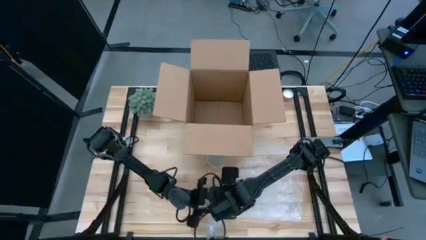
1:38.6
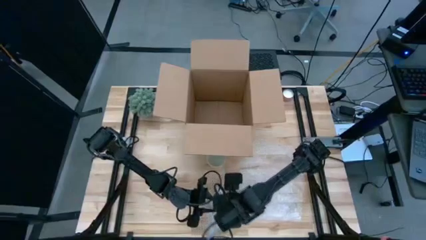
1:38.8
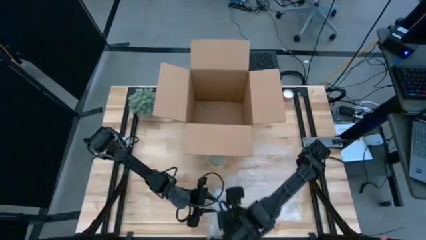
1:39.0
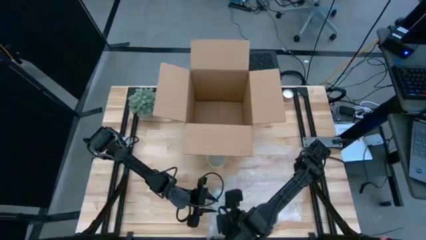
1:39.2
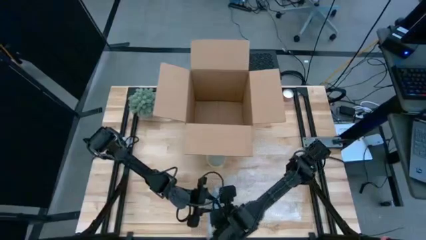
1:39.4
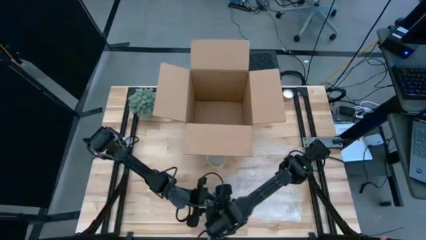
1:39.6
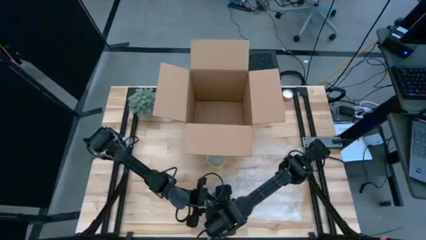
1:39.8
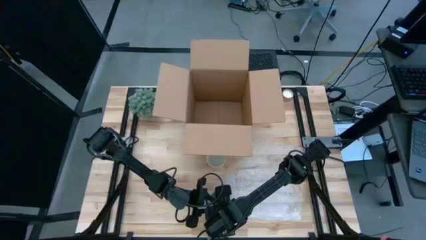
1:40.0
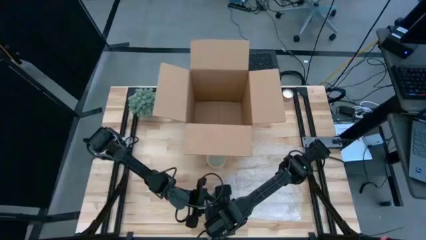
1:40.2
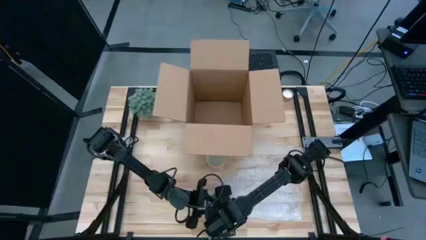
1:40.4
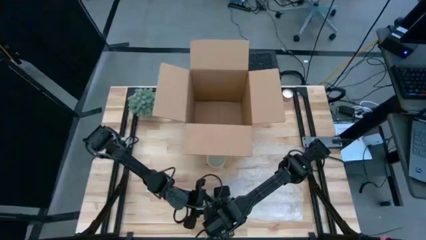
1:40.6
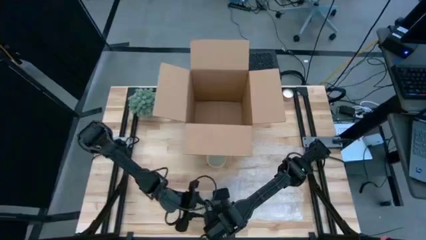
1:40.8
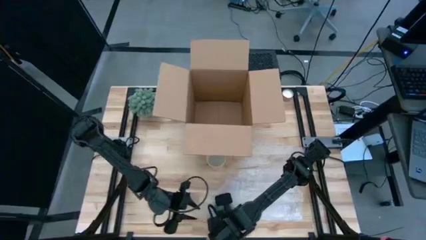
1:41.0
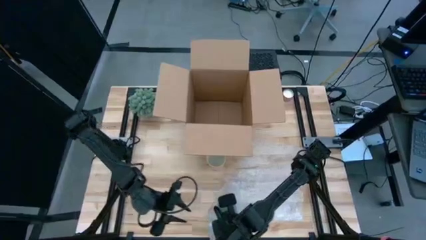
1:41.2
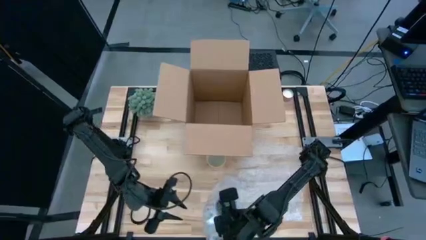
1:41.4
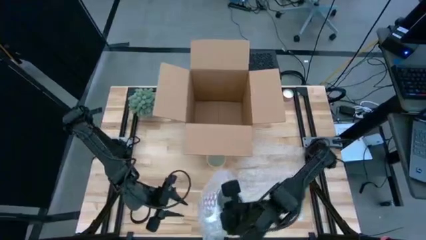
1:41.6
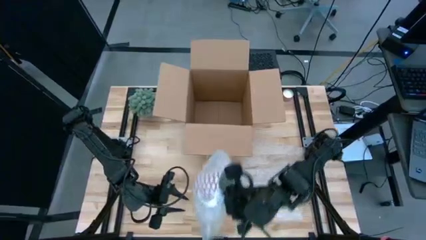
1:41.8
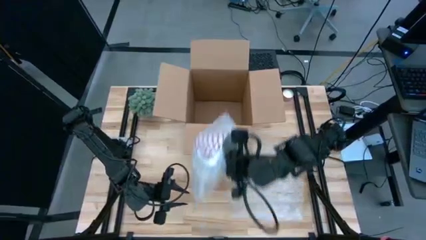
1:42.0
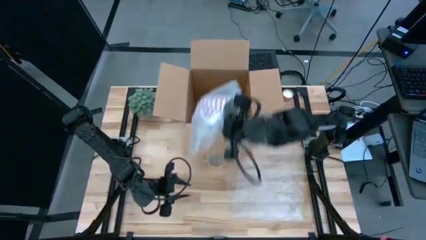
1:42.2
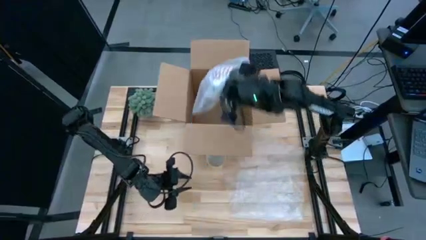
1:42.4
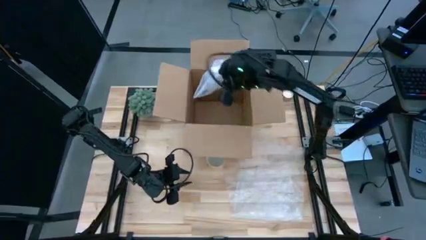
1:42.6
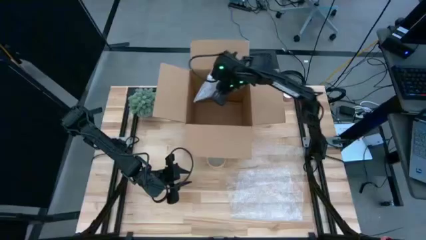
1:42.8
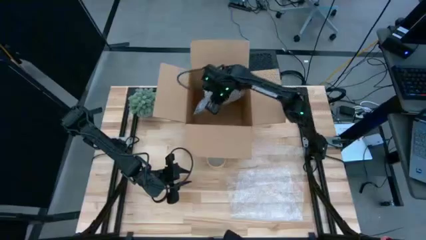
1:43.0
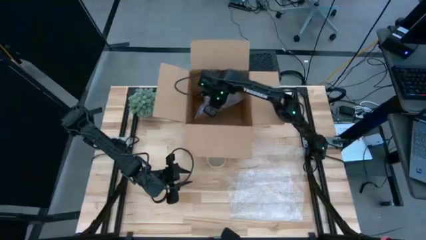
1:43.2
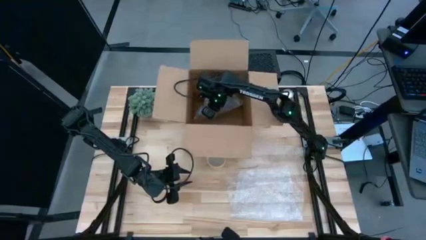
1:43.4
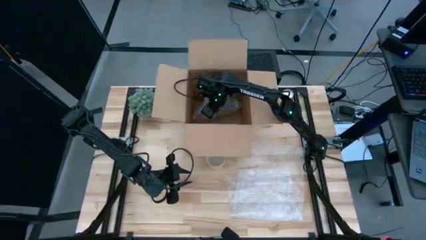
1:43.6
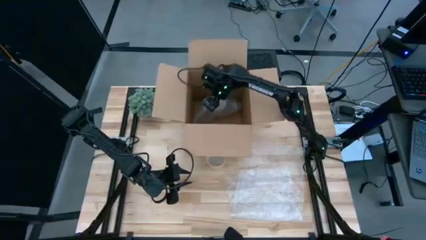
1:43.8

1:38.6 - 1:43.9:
Task: wrap mug
Put the wrapped mug into the box

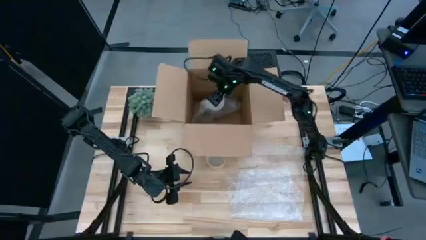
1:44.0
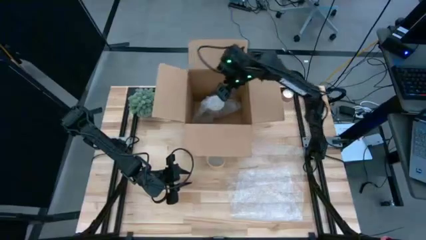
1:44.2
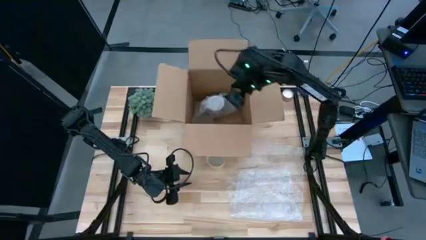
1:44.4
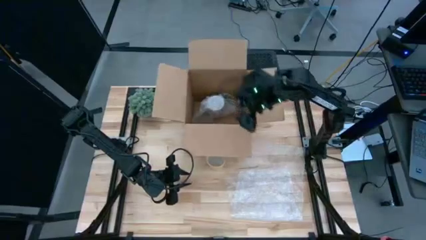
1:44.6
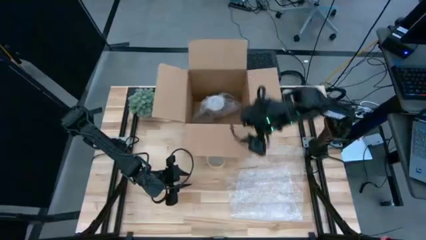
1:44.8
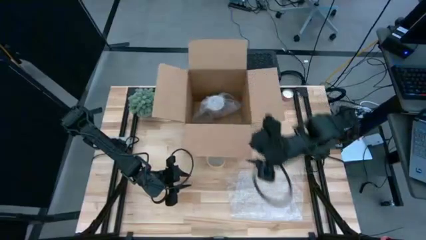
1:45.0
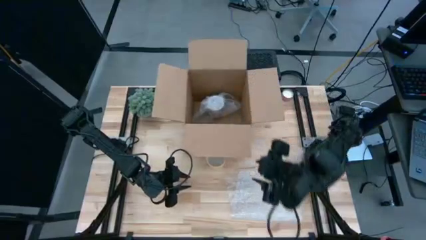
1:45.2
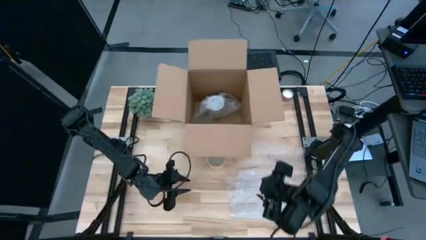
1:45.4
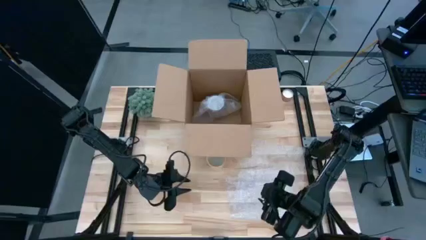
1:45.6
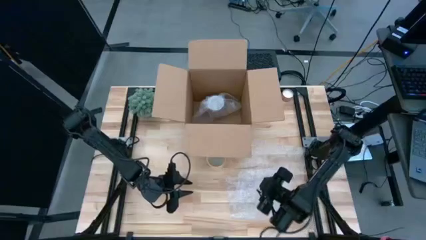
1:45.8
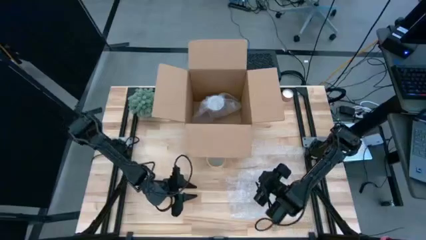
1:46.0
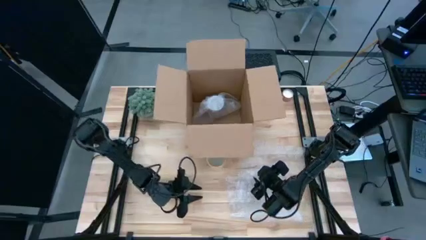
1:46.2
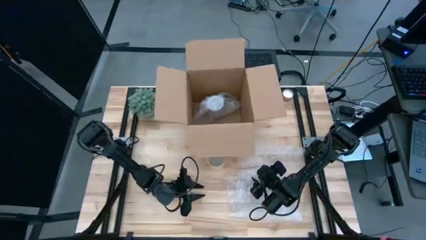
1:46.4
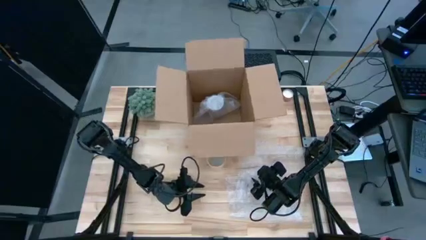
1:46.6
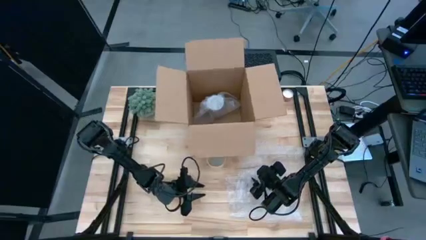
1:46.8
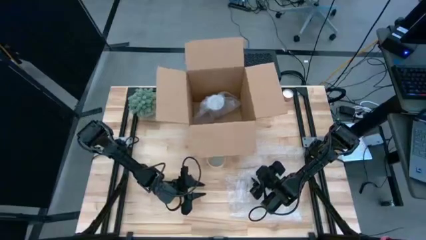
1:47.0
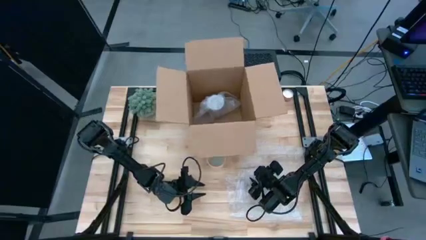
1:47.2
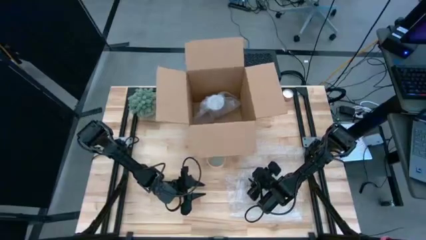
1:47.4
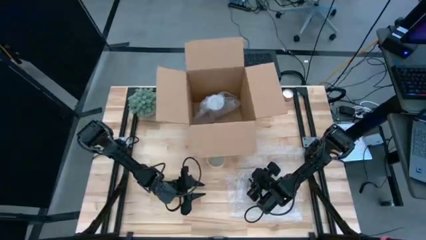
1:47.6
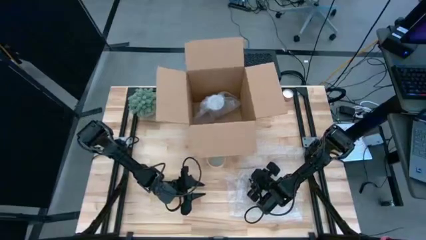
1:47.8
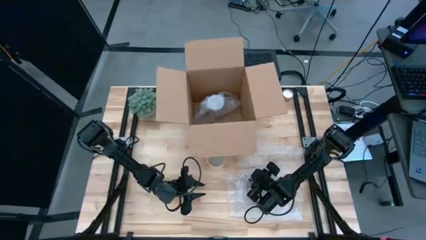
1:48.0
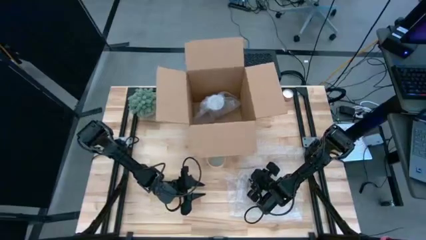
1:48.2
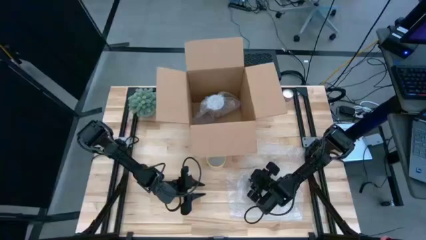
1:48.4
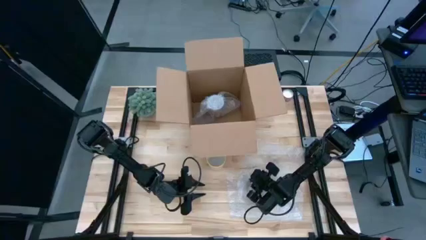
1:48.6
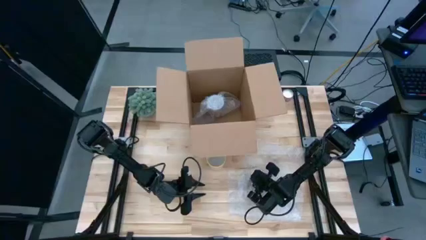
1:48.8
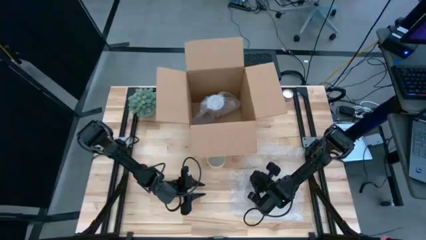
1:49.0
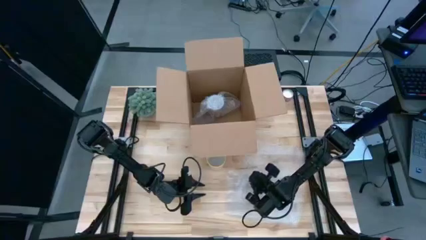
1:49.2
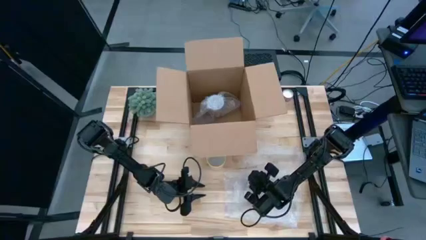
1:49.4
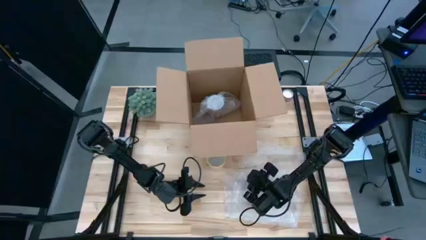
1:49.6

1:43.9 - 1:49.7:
Wrap the yellow patterned mug with bubble wrap

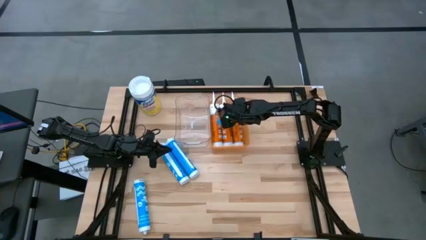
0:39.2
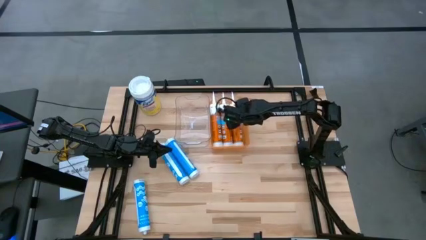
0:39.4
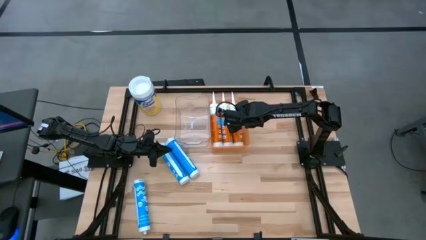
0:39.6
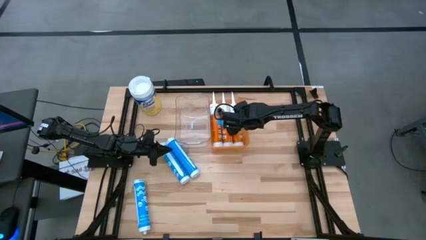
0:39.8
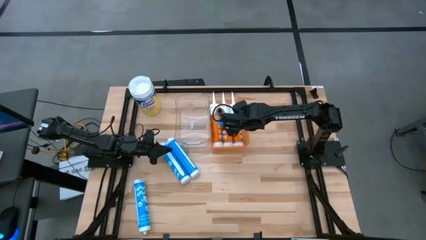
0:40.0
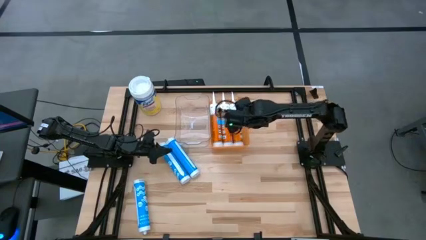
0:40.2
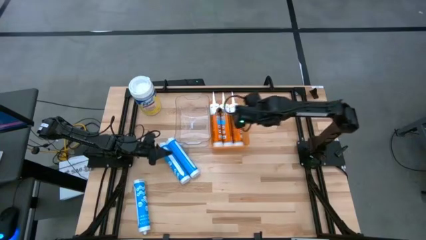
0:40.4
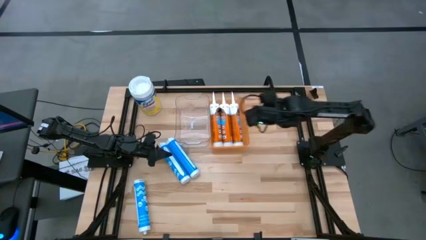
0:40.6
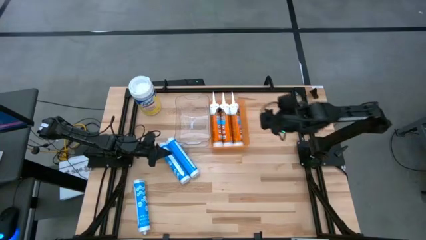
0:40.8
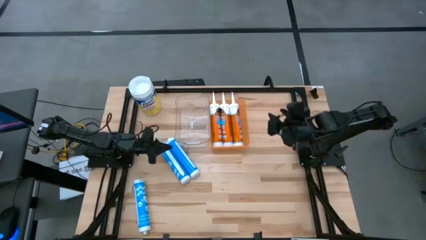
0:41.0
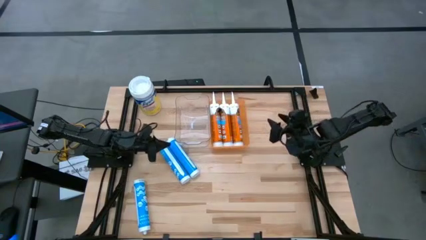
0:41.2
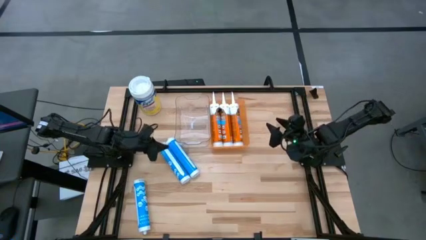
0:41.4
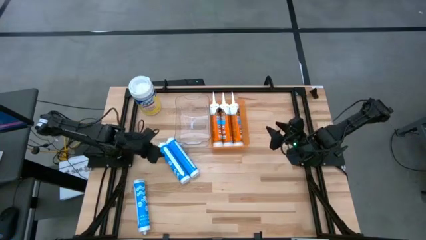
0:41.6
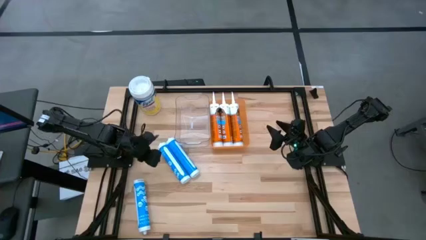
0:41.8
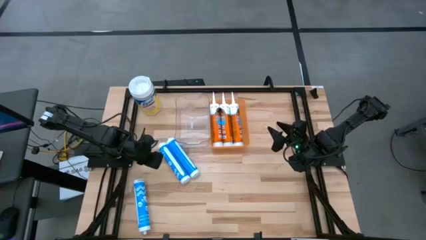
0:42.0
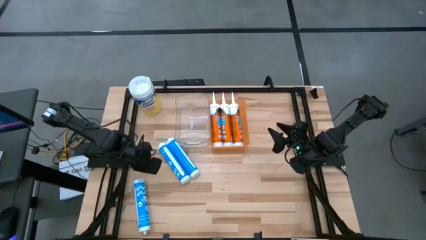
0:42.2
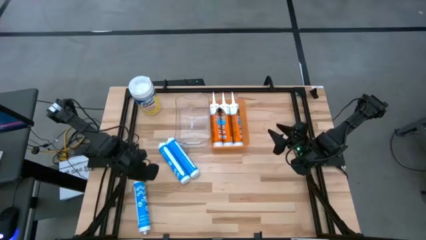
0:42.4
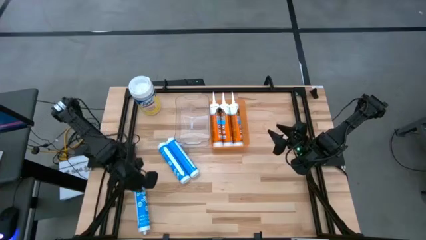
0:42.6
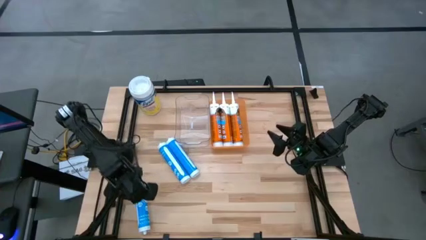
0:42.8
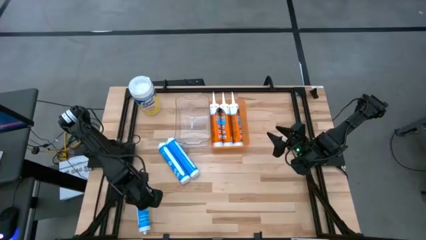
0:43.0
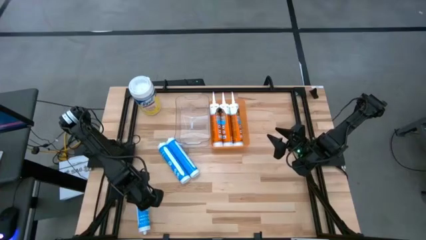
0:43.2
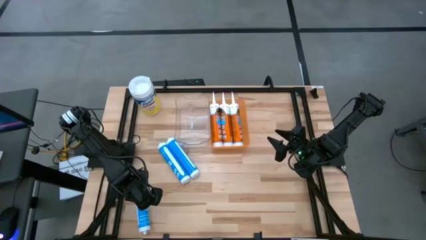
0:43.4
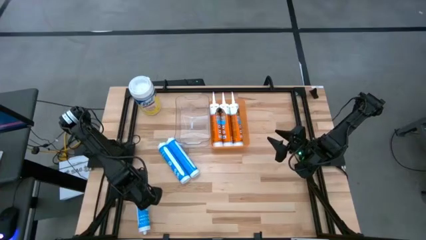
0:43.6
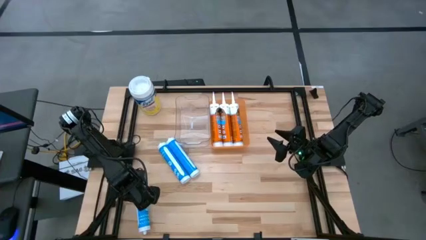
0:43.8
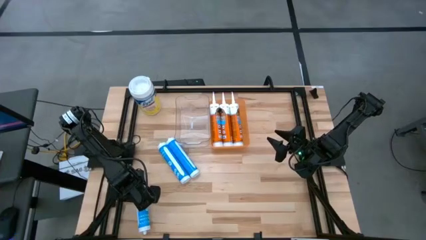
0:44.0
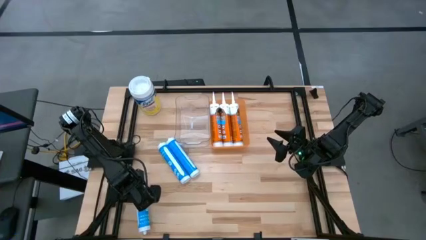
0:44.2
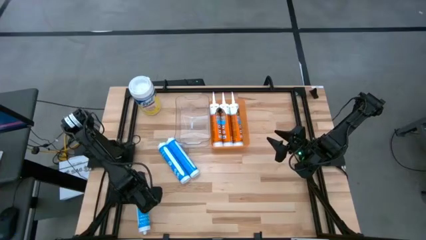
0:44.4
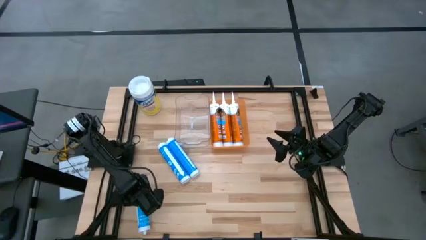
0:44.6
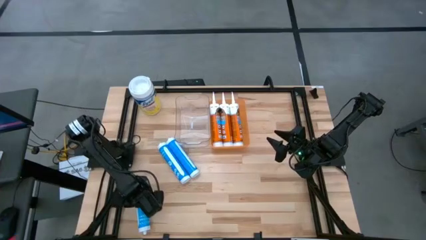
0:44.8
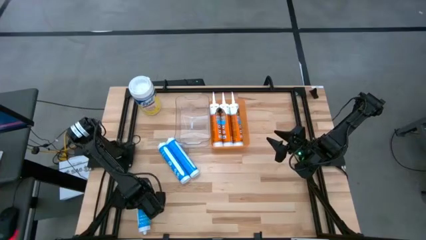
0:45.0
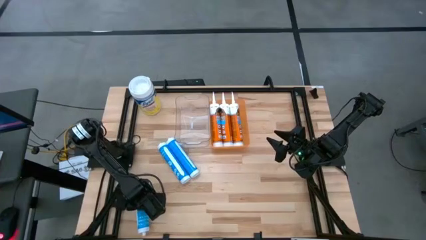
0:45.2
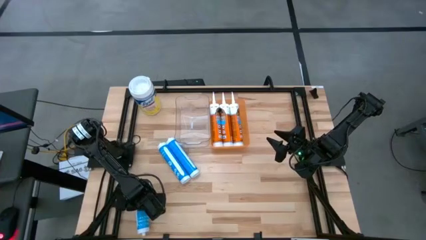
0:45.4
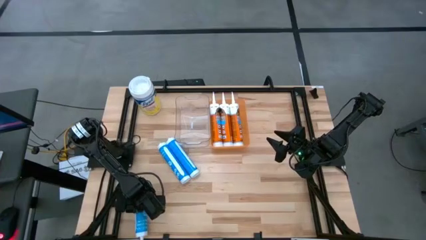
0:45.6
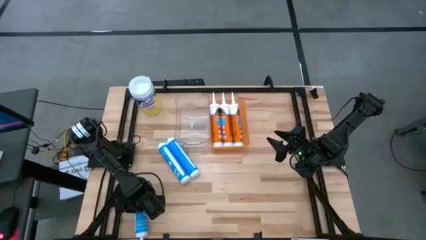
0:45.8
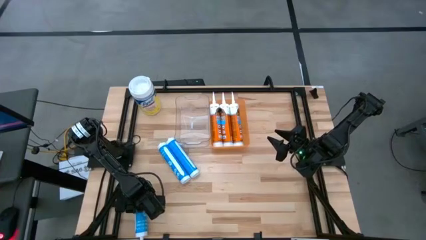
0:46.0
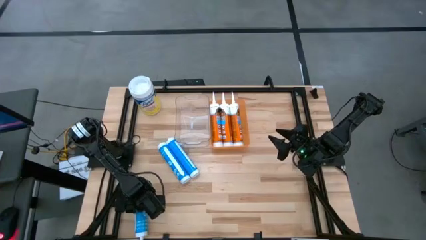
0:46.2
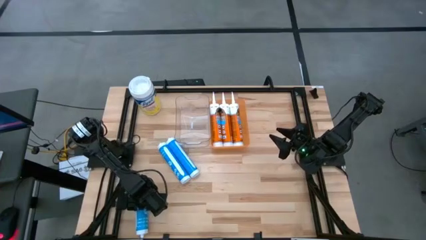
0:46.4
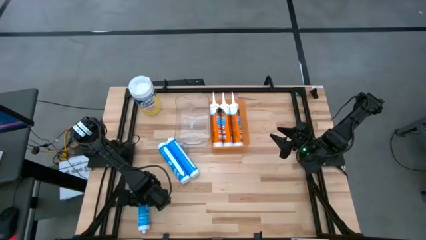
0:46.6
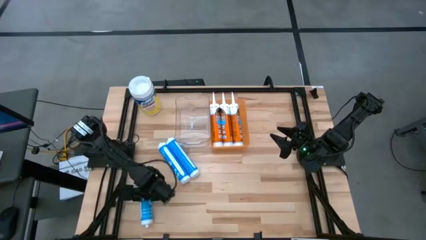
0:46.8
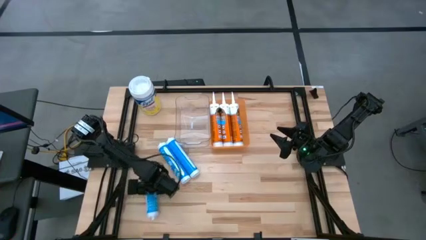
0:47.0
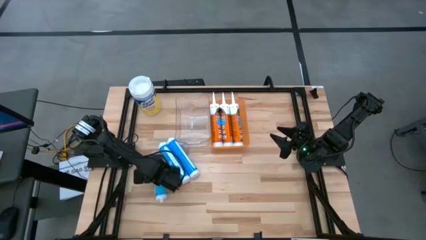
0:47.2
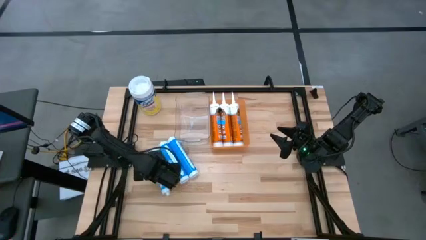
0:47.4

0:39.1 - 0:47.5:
Task: Pick & place silicon tubes, Sealant and Lysol wipes
Put the bottom blue sealant into the transparent bin
